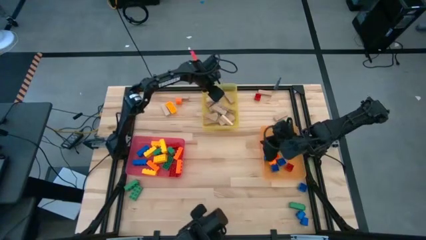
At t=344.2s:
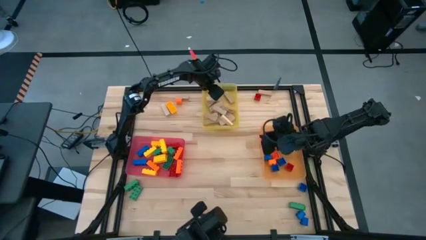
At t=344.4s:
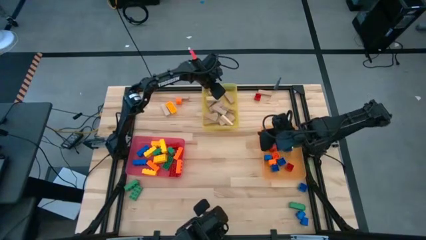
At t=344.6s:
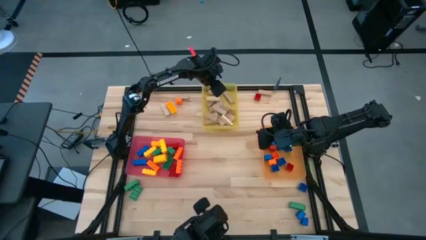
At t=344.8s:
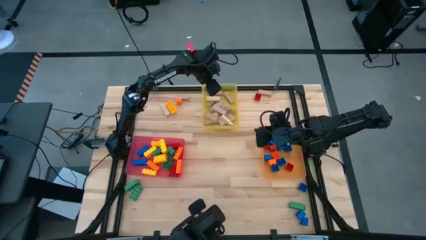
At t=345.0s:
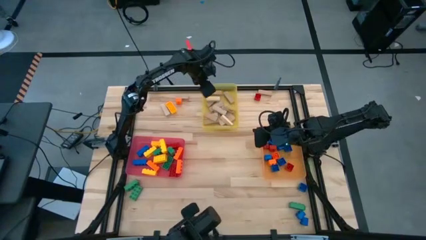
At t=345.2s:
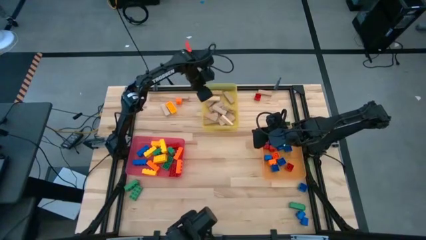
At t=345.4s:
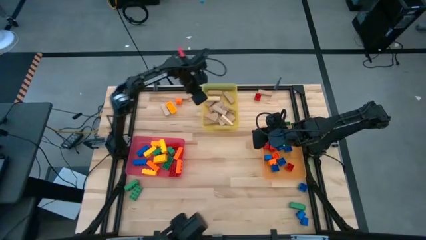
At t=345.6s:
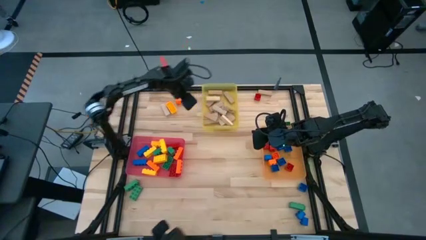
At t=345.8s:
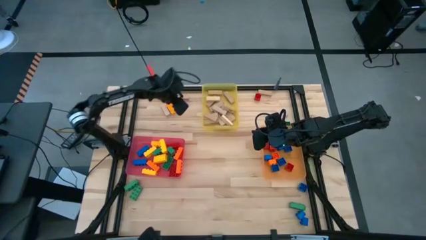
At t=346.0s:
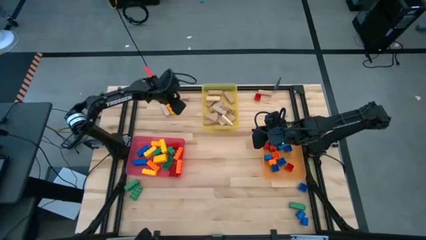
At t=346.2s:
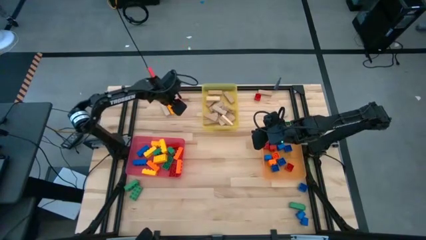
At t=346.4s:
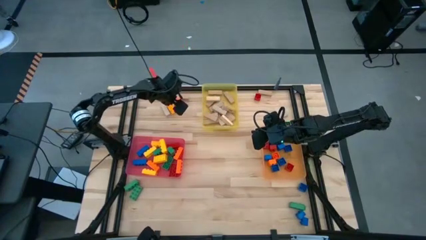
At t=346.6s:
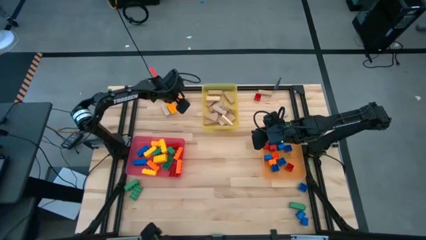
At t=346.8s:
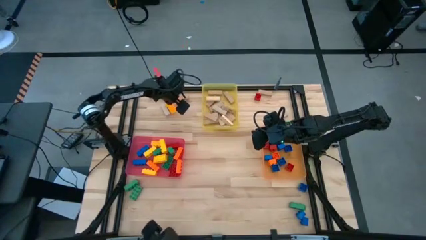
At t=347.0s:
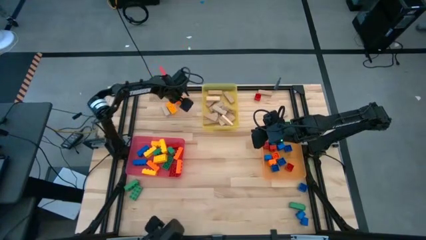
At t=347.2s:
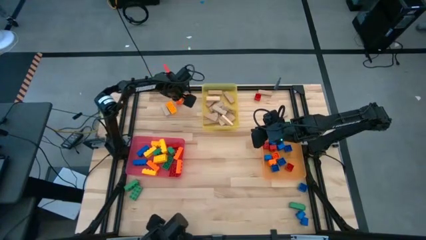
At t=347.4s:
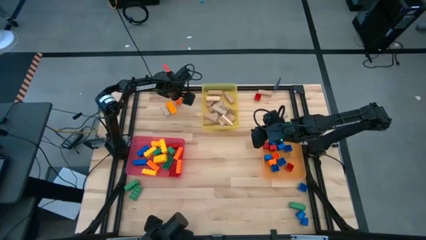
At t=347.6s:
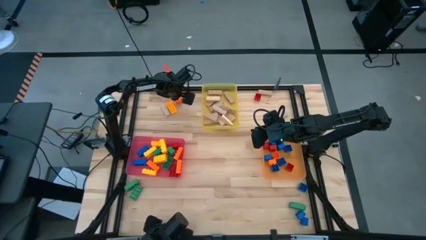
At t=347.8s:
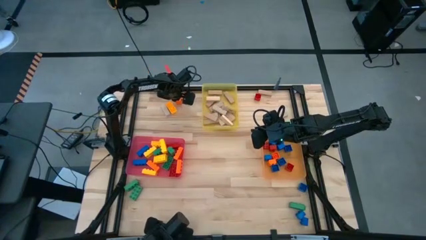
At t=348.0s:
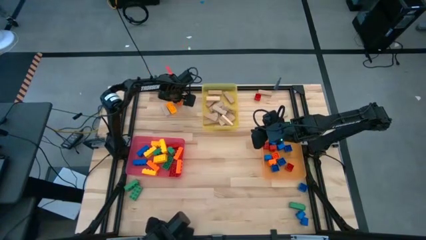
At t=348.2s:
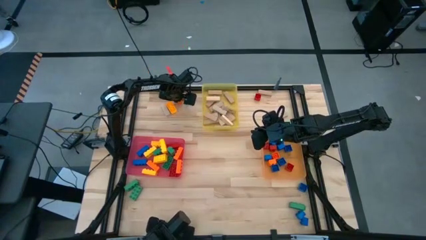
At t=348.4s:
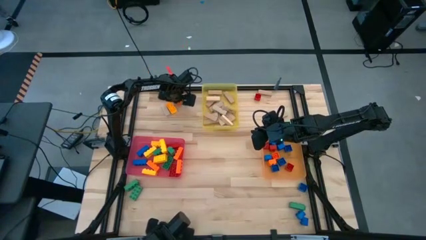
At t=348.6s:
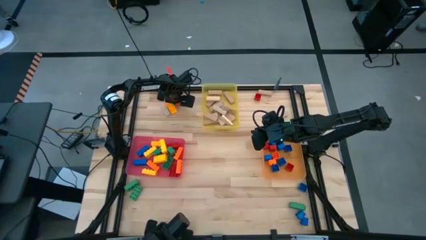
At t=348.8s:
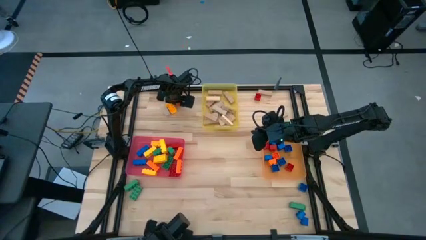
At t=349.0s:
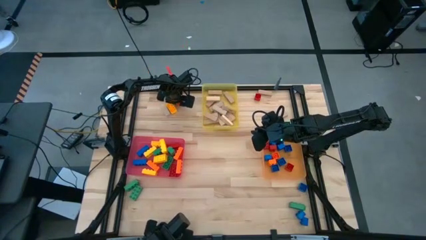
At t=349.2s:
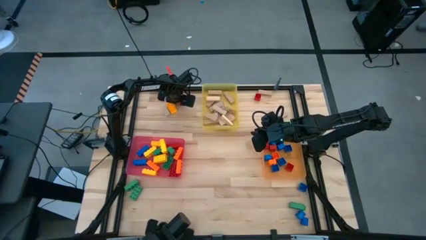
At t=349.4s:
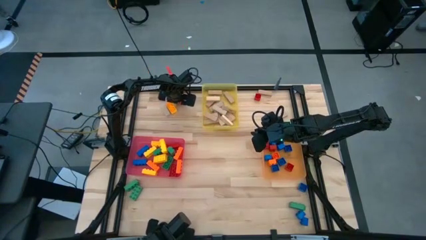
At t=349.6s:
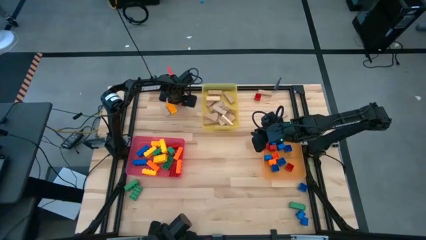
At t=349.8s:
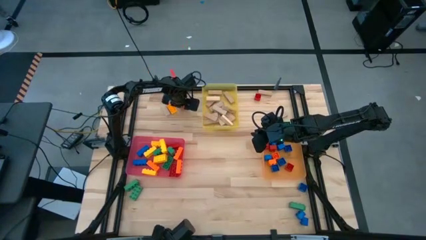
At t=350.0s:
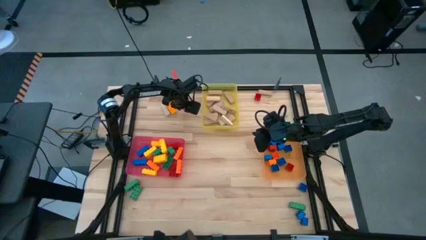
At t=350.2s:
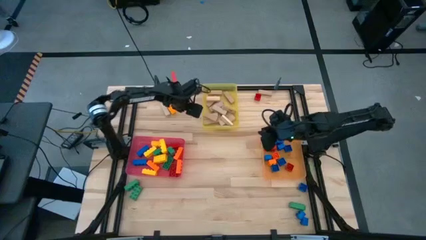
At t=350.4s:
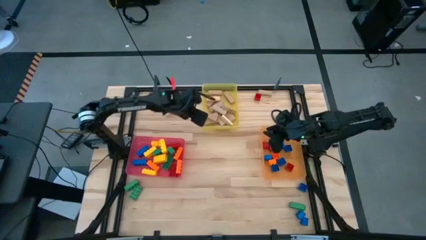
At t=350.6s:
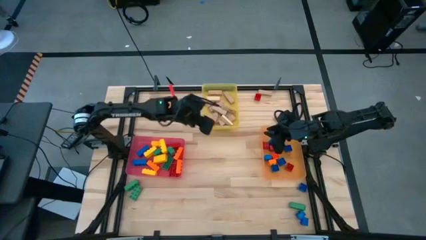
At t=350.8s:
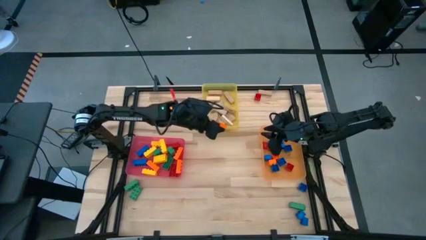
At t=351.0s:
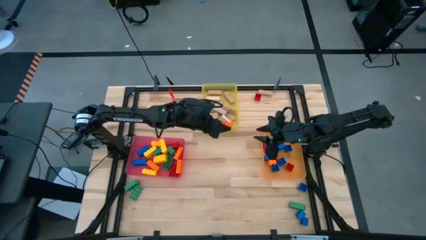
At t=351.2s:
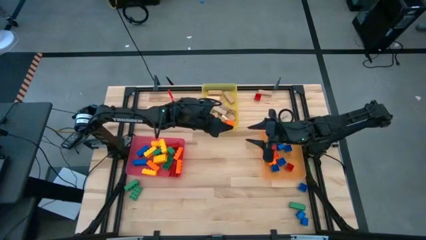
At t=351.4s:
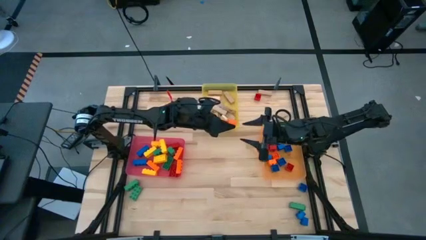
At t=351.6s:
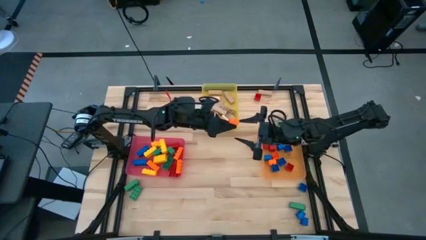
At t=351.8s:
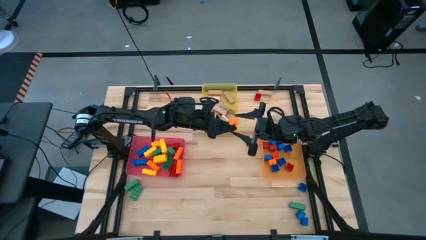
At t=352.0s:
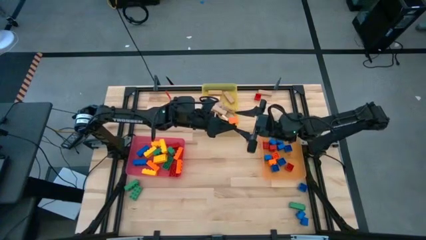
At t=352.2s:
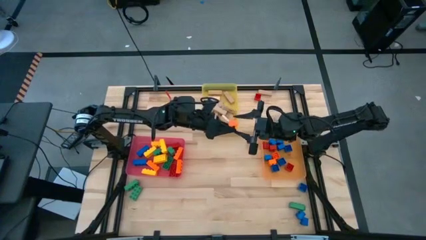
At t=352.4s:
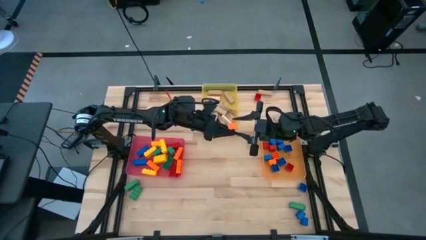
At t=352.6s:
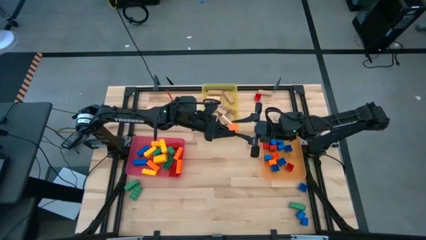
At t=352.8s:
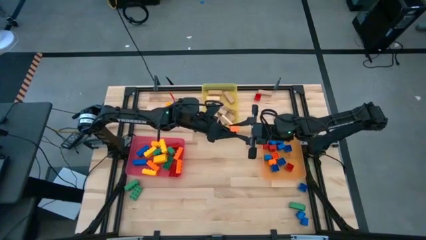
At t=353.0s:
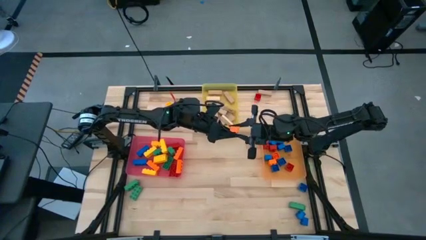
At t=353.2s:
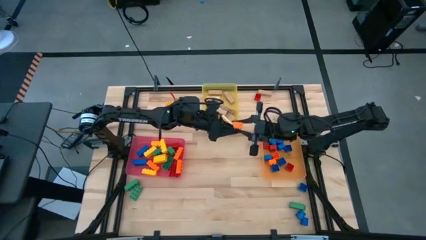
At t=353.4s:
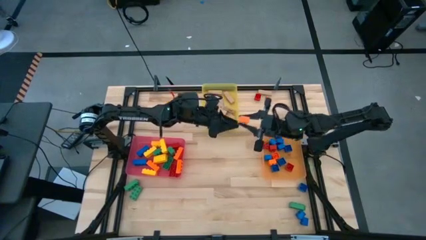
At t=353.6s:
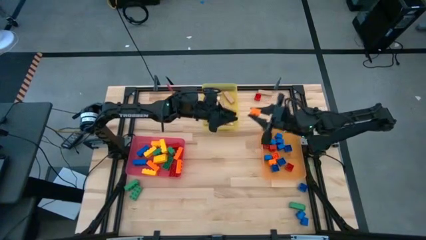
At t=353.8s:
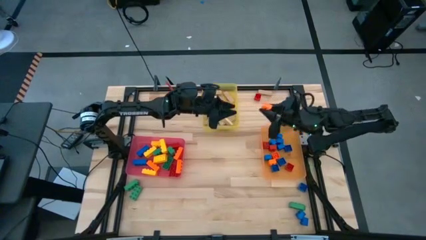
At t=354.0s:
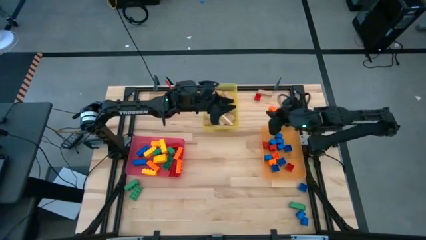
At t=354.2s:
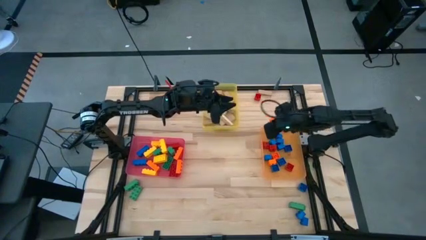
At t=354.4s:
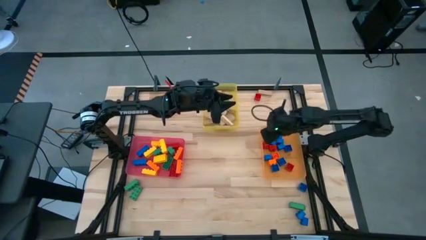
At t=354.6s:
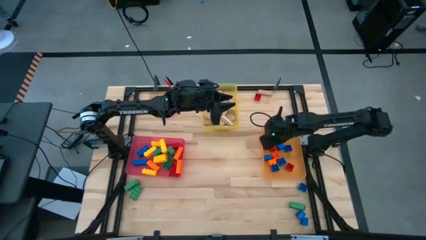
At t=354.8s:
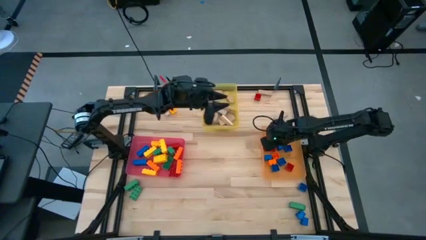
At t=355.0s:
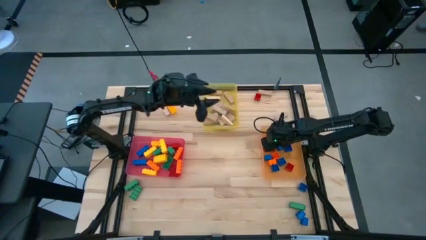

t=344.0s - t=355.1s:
Task: Sort blocks by size
Put the 1 stud orange game piece into the orange bin

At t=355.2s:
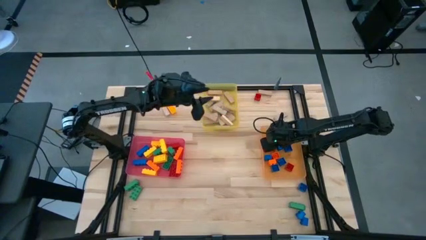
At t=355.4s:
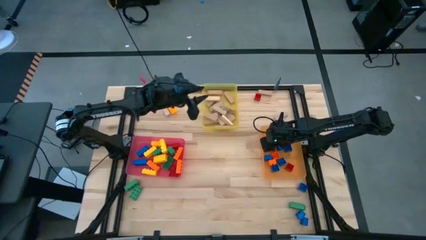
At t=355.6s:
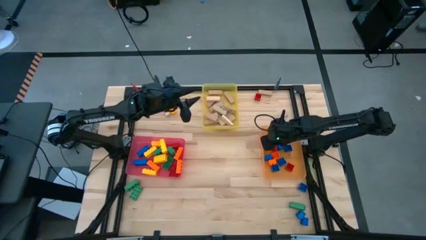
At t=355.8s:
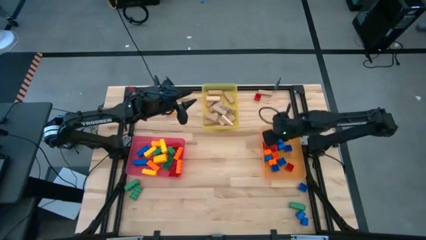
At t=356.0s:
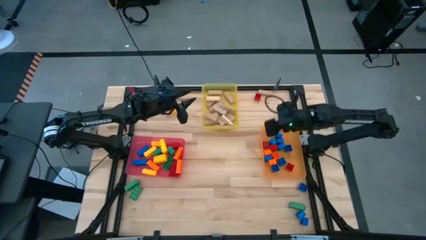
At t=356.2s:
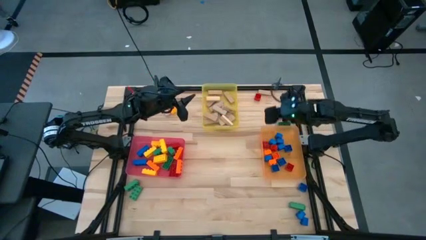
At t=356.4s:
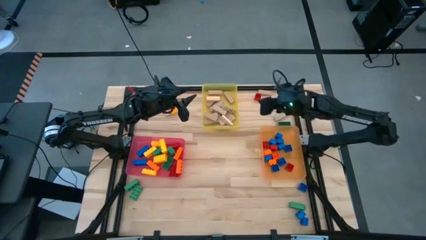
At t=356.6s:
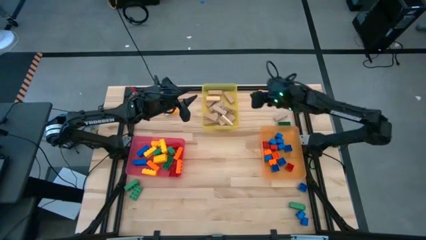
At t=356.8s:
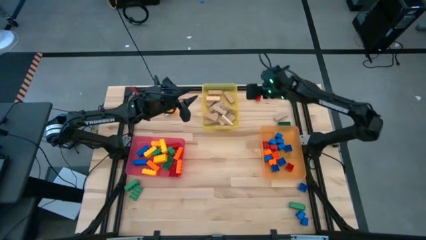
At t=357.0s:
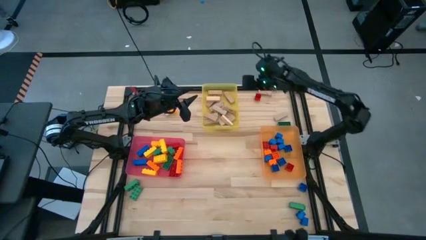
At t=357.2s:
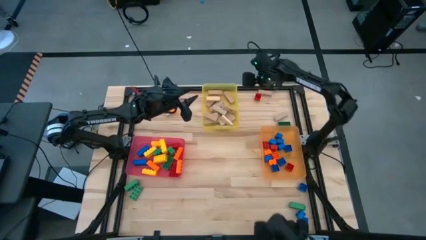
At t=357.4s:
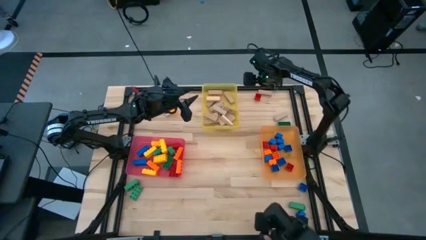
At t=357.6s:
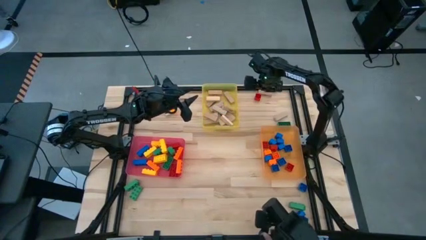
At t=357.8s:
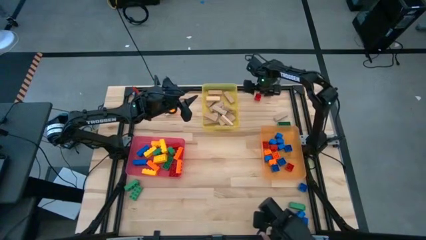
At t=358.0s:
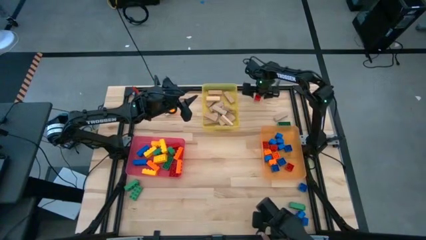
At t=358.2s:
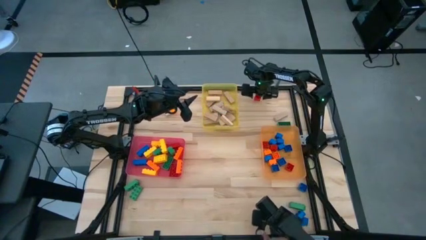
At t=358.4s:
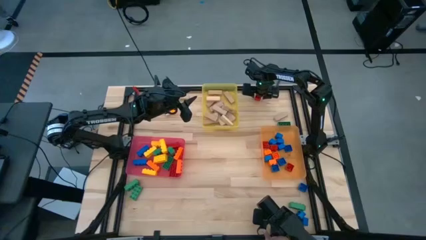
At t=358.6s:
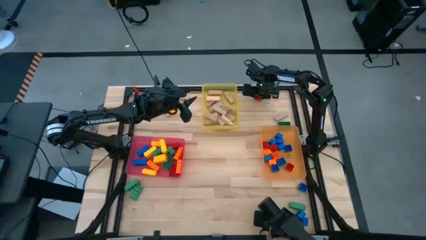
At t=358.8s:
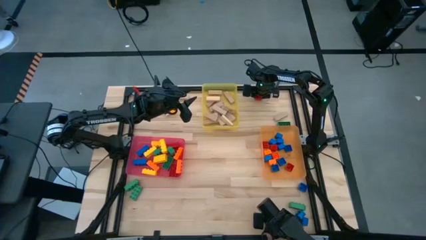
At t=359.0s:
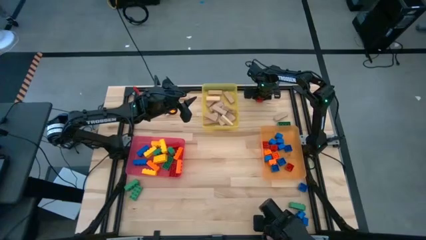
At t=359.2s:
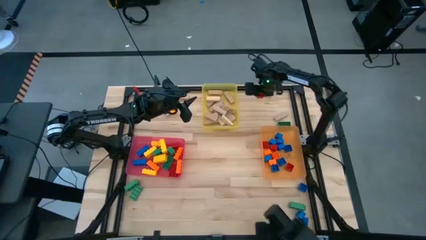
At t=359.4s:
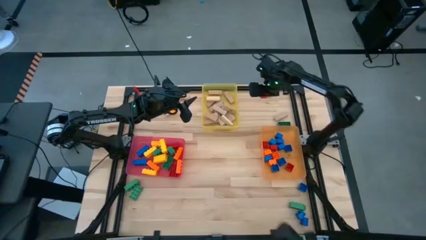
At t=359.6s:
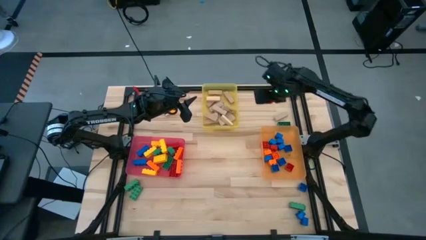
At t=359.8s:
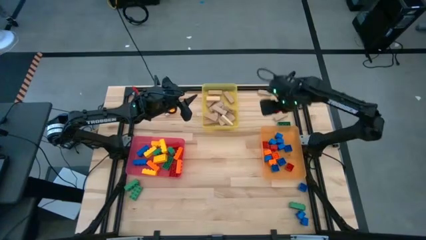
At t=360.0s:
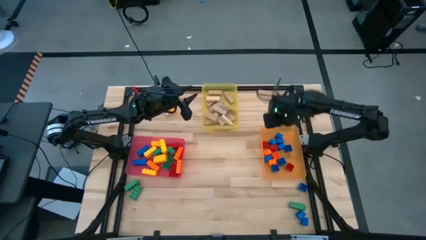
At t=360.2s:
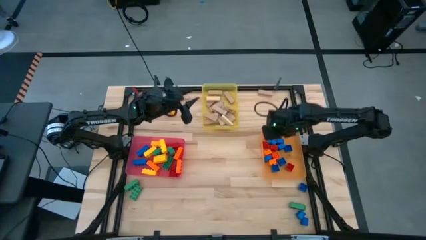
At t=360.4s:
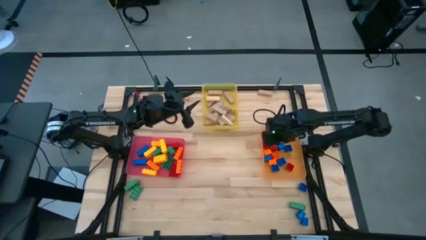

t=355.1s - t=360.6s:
Put the 1 stud red game piece into the orange bin
